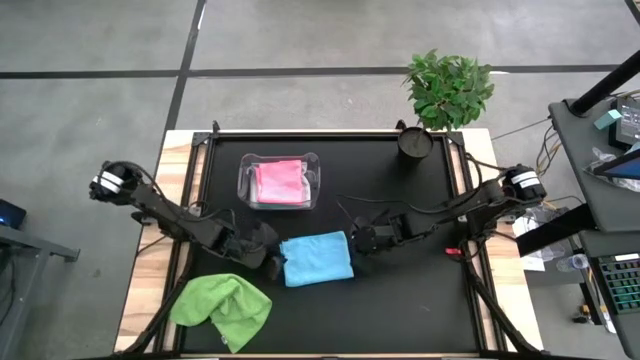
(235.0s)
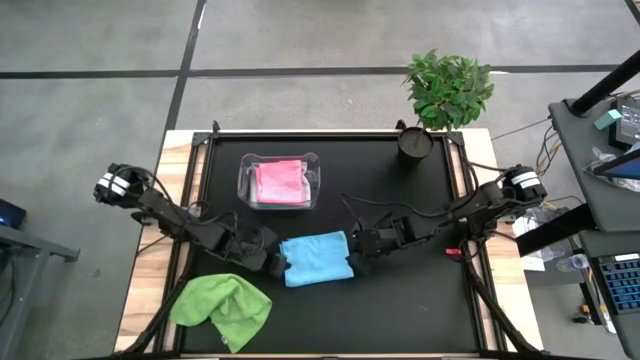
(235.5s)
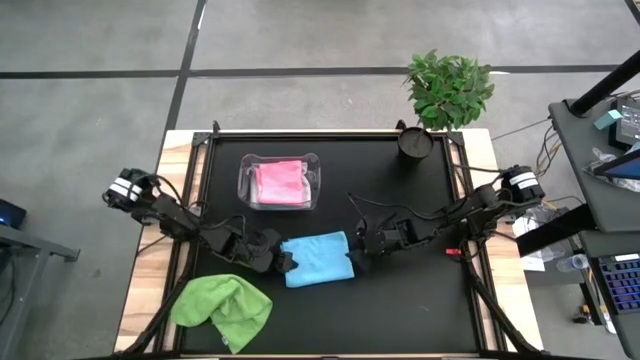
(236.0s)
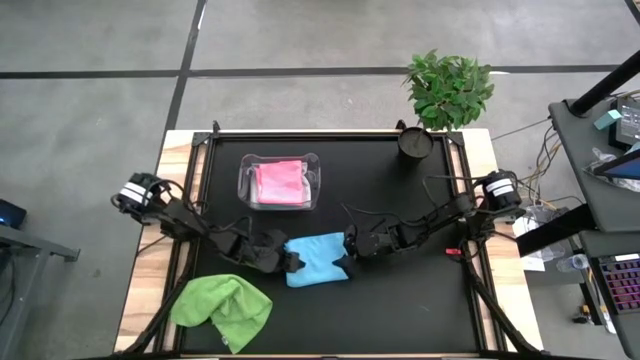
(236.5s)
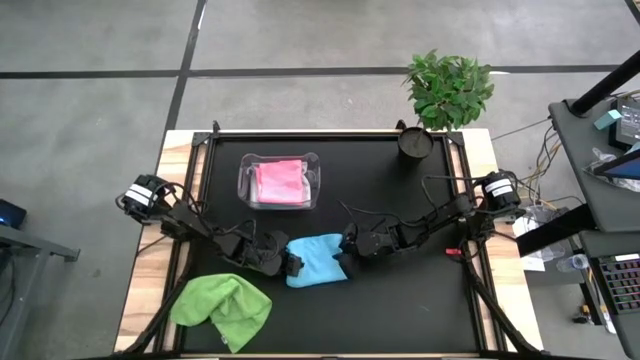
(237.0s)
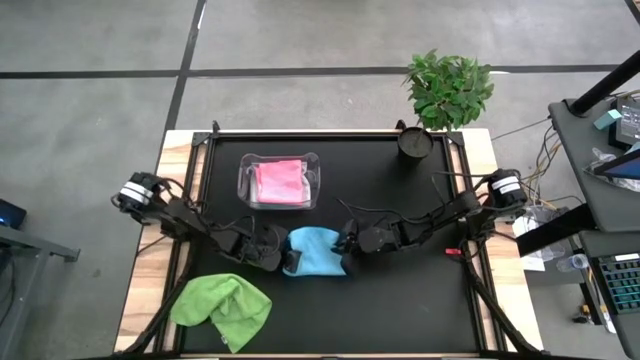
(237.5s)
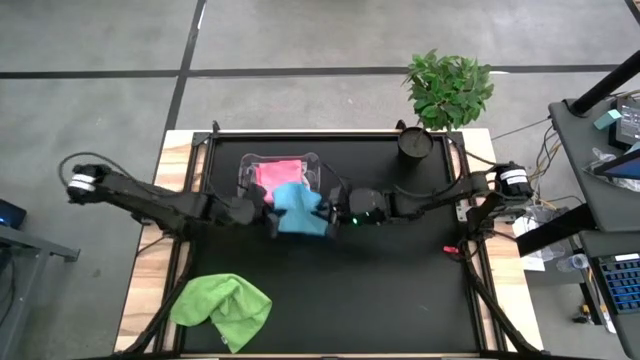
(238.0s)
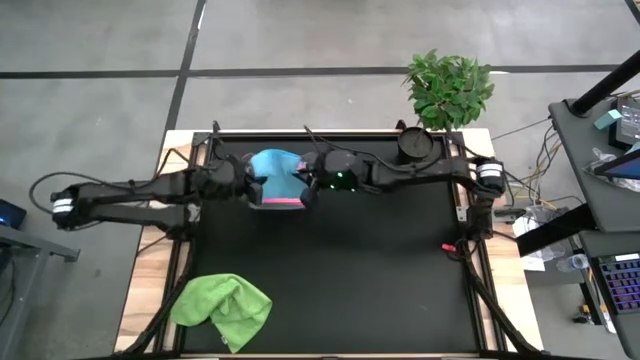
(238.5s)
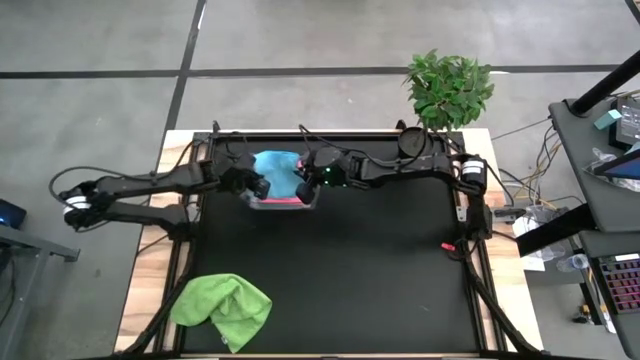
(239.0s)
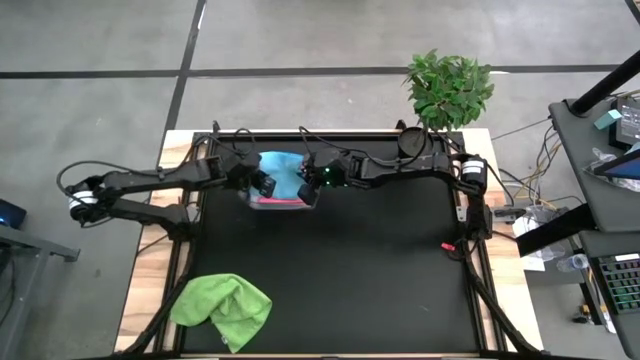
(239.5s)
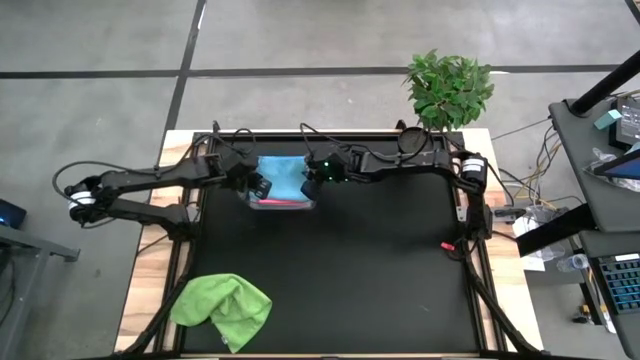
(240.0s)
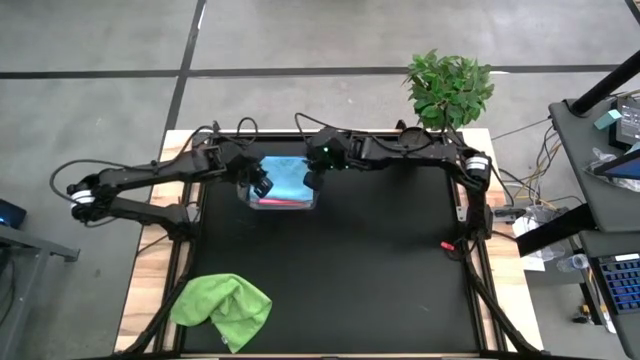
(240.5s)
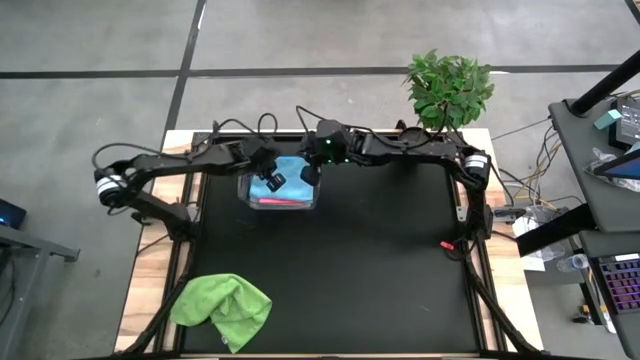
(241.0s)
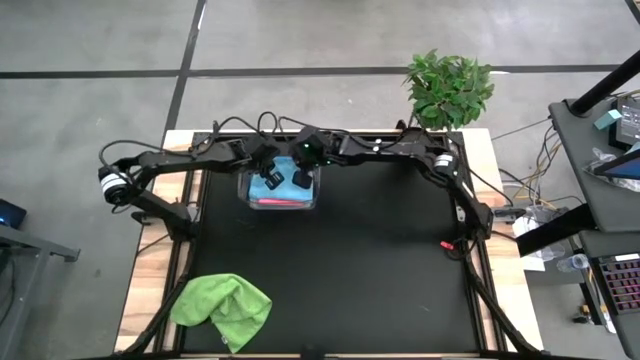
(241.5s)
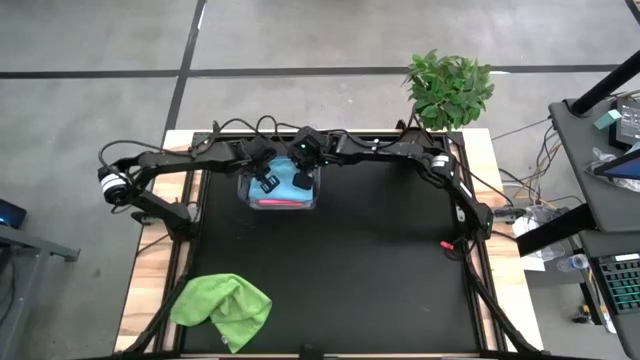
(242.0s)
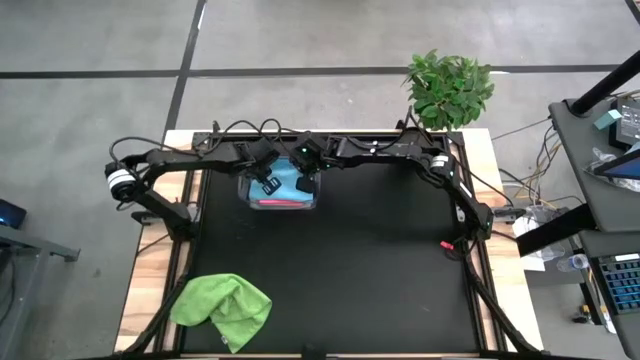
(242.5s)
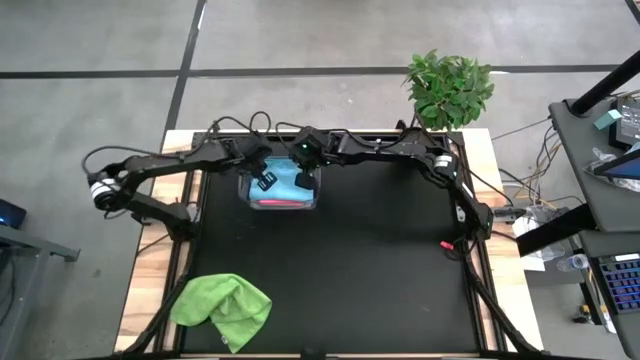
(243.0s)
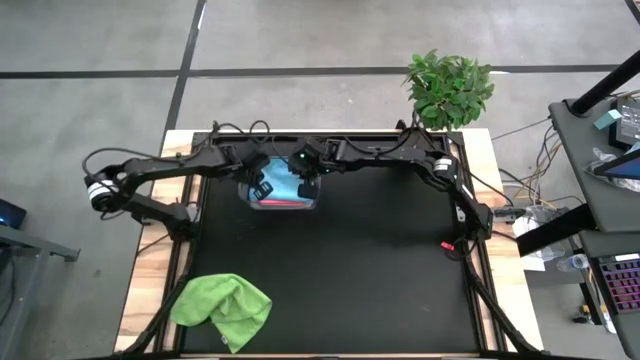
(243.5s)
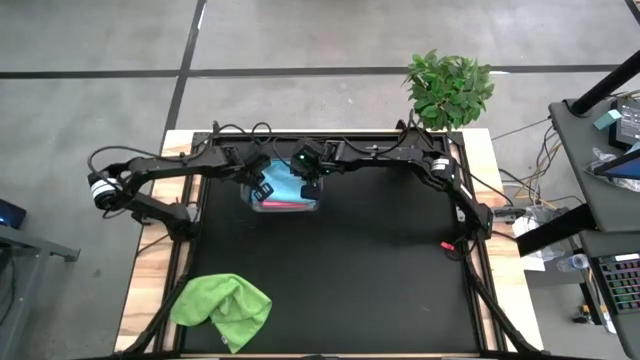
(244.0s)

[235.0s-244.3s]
Task: Fold microfiber towels
Put the blue microfiber cloth into the transparent bin

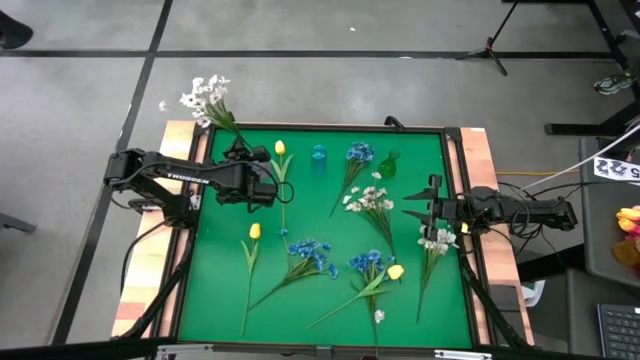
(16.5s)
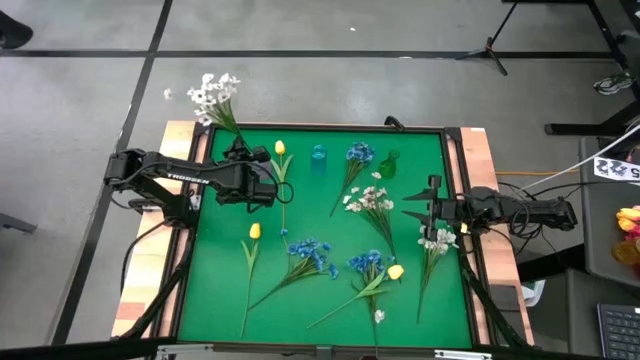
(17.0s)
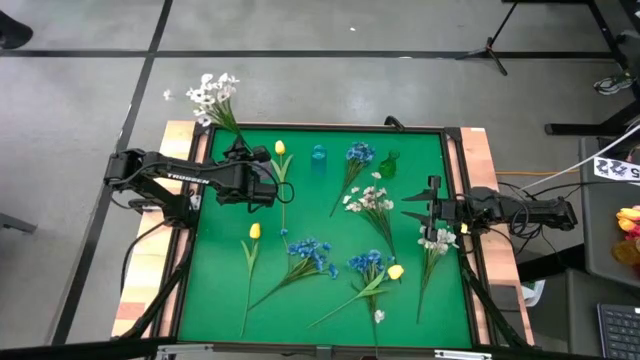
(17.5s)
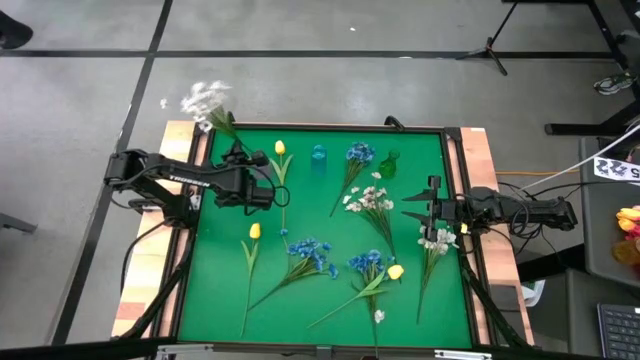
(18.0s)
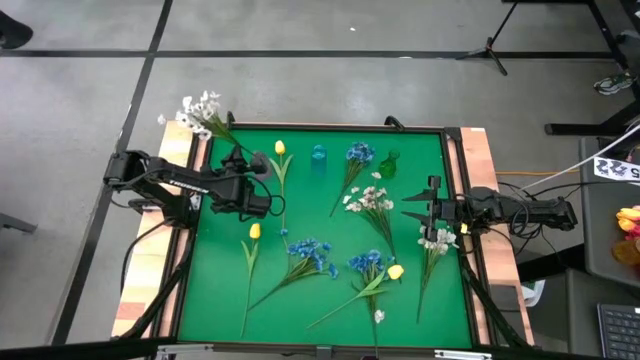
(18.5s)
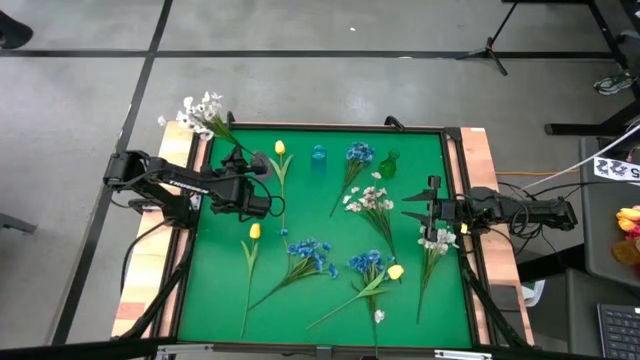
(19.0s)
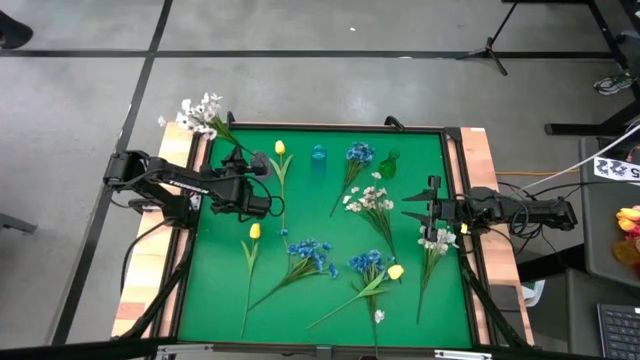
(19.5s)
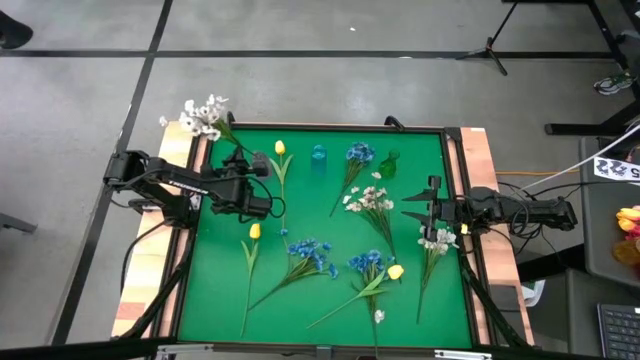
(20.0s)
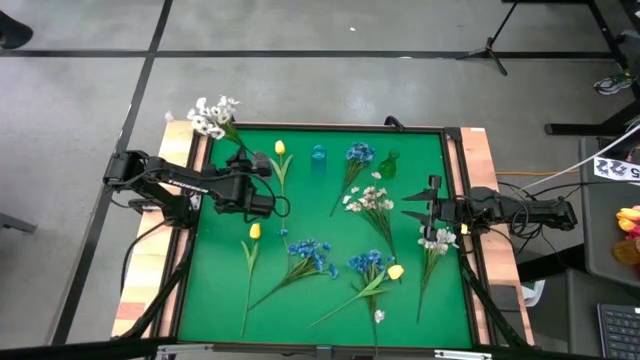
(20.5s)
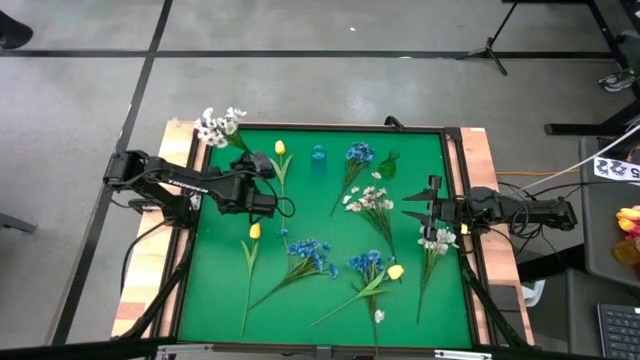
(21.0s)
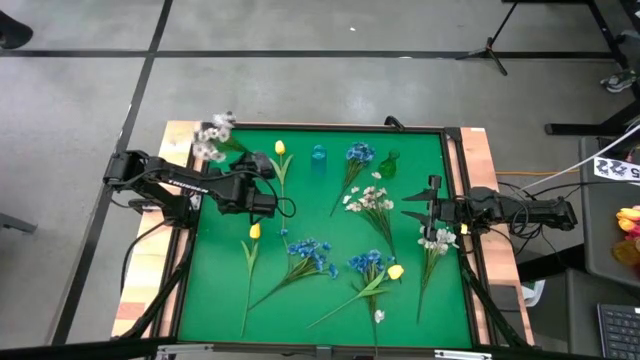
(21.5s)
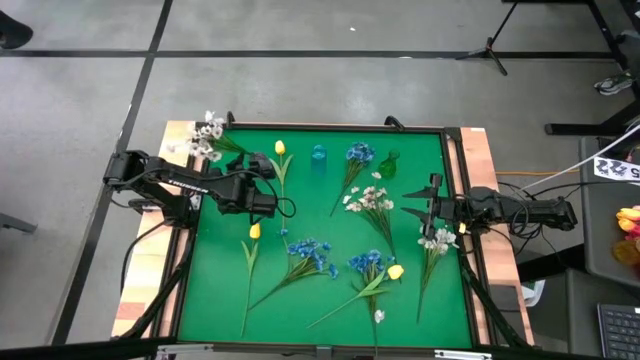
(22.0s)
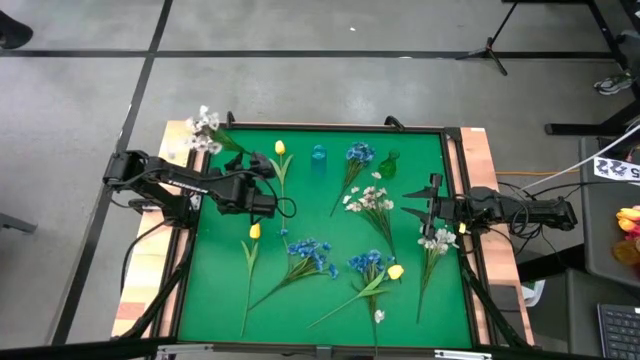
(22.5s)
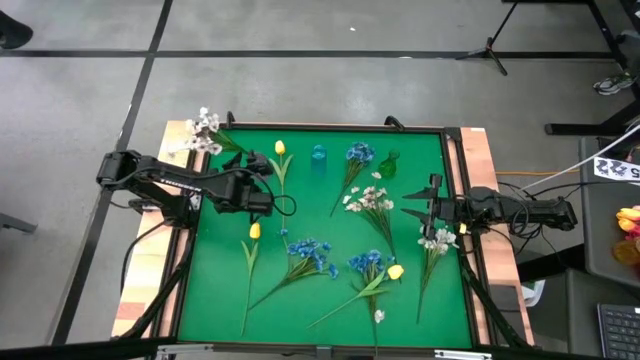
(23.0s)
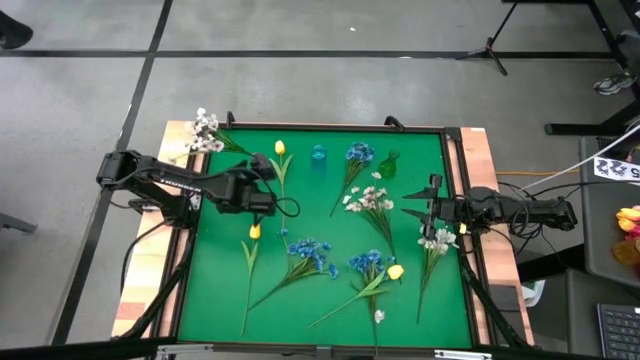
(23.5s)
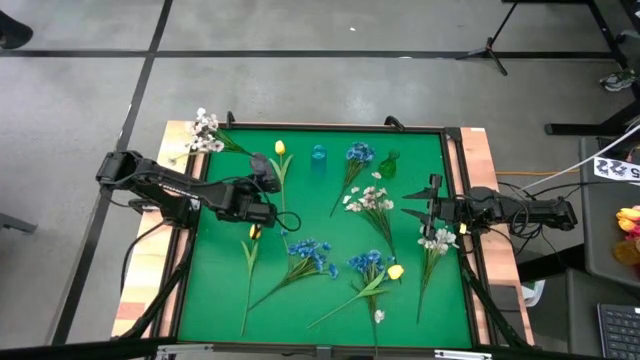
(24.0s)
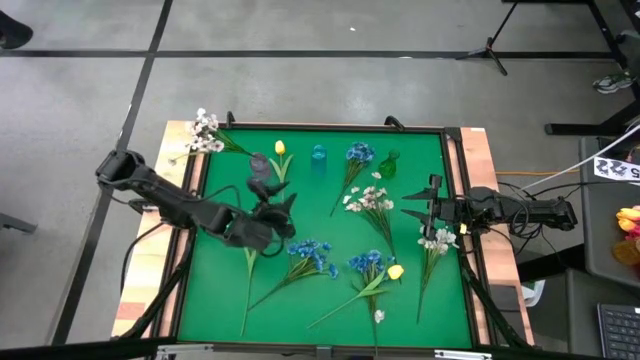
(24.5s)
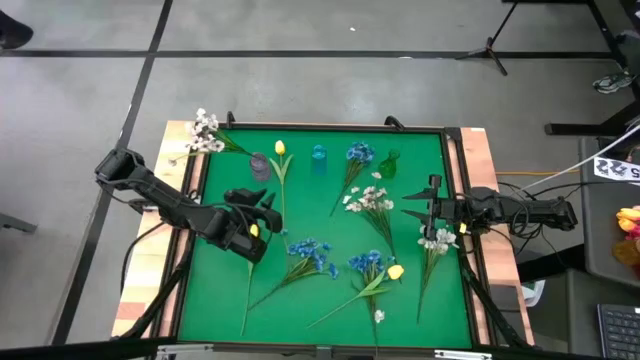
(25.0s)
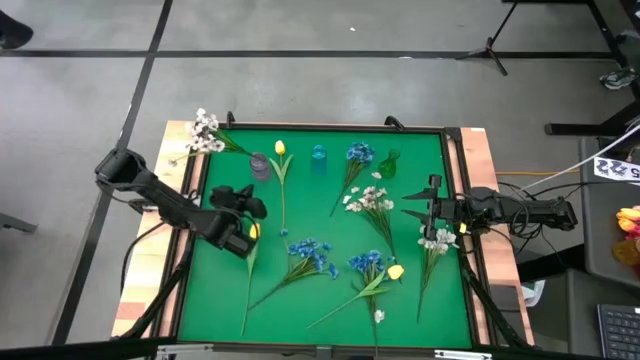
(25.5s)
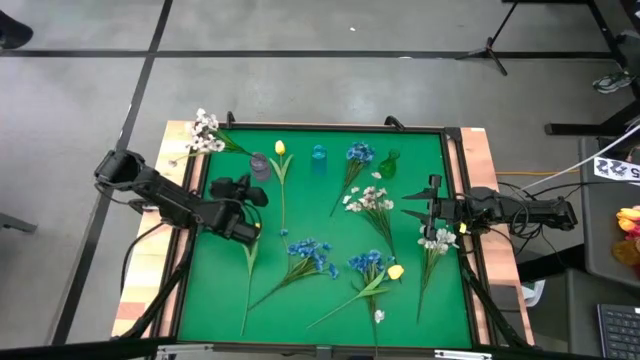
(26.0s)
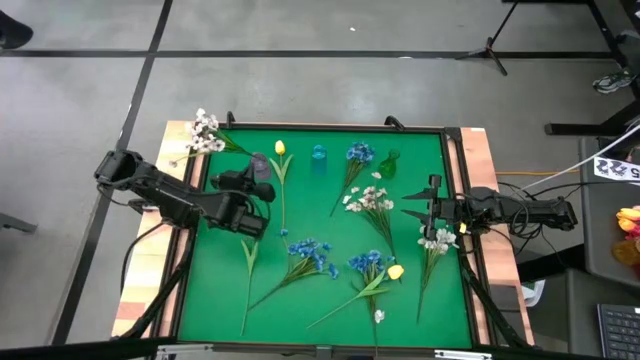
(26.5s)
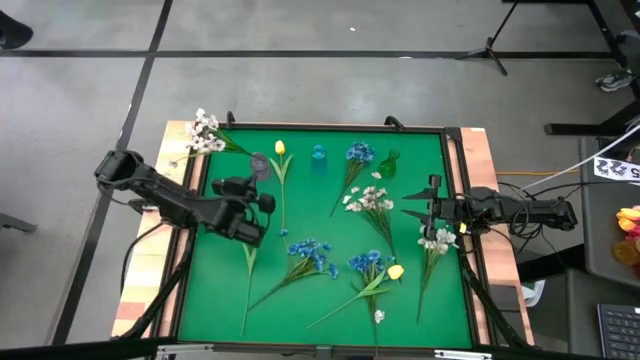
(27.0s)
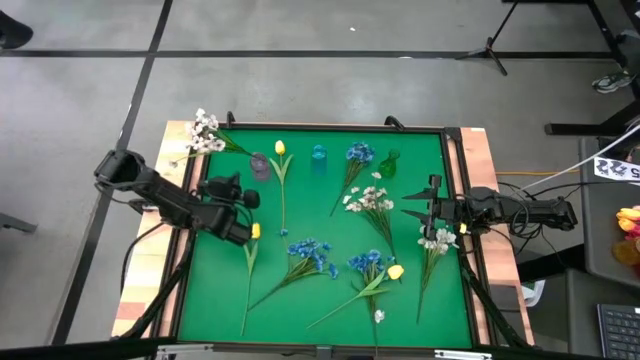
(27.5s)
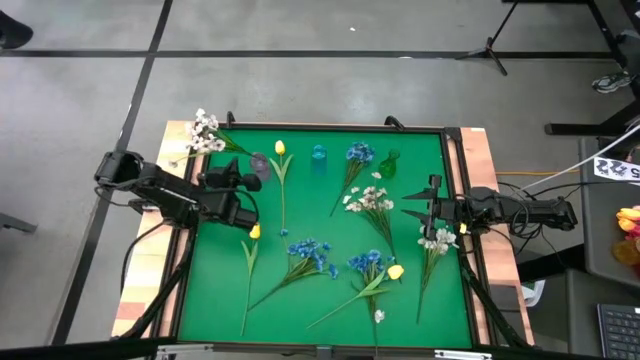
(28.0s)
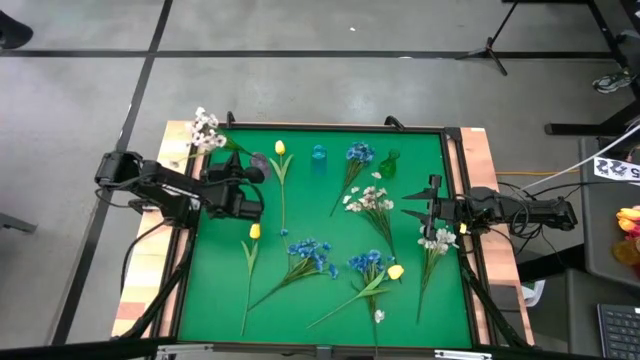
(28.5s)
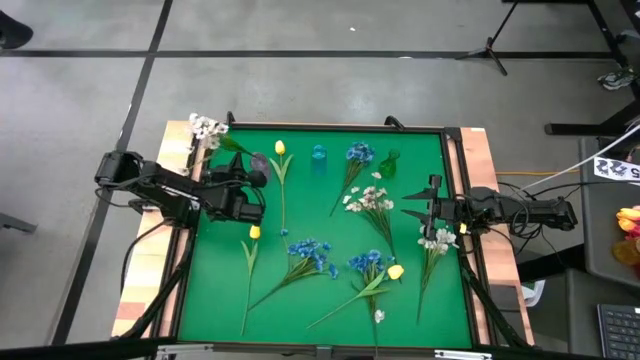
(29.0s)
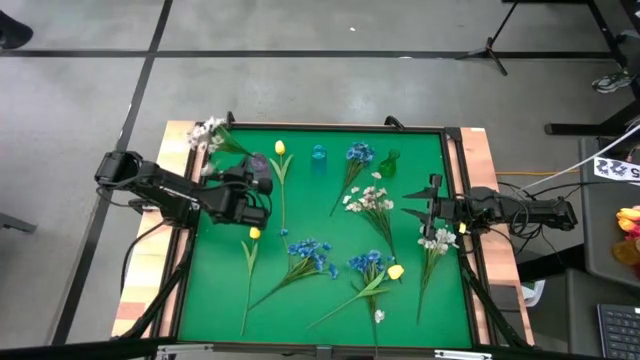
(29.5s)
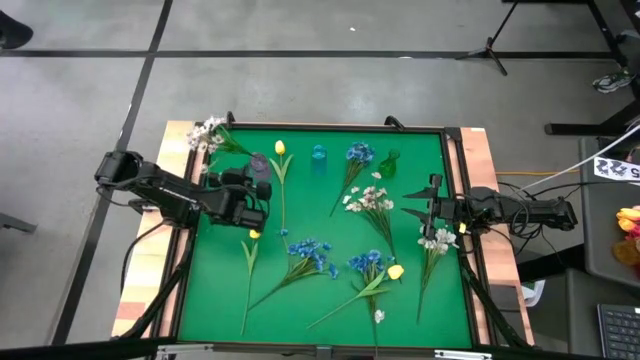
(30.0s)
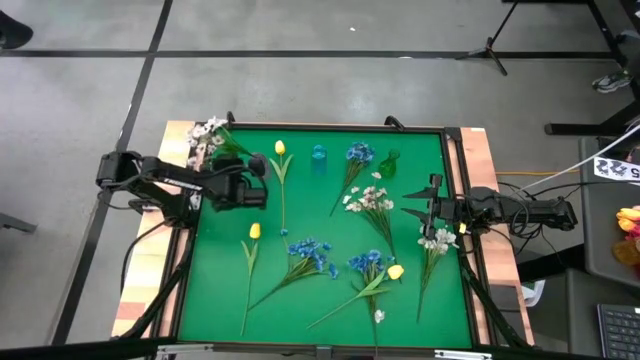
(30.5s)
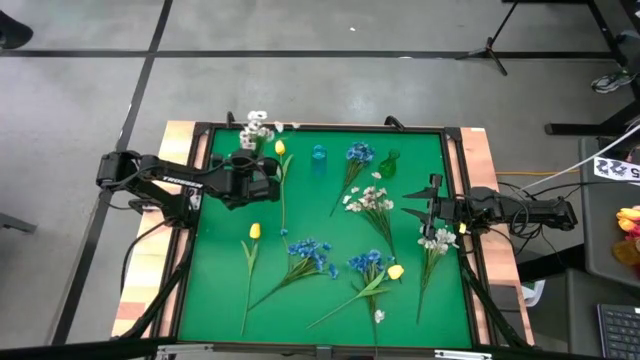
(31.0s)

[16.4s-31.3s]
Task: Sort flowers into vase by color
Put the top left white flowers into the violet vase
